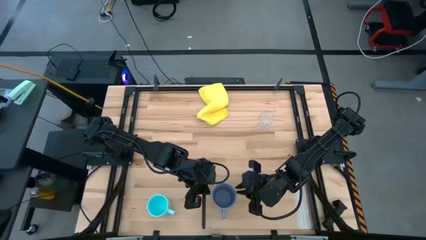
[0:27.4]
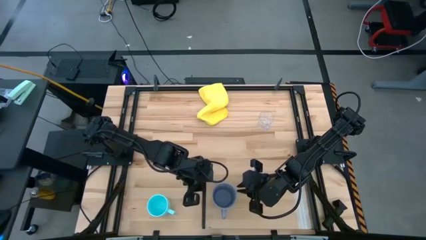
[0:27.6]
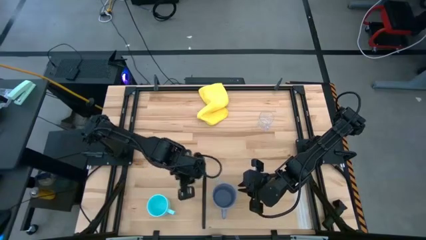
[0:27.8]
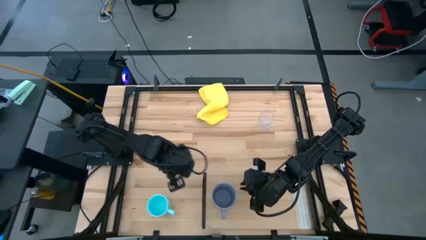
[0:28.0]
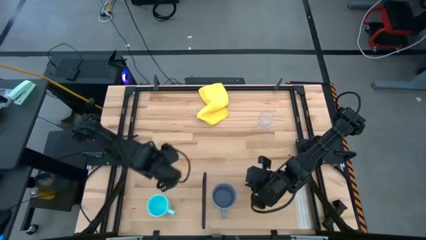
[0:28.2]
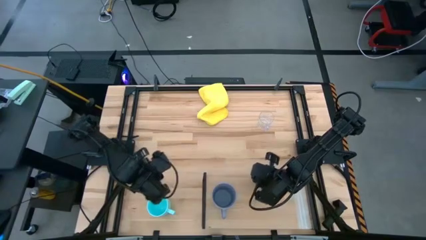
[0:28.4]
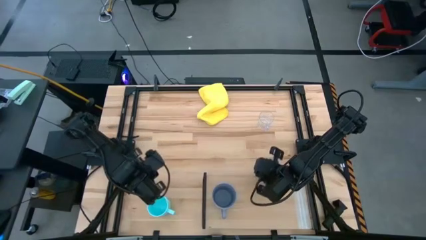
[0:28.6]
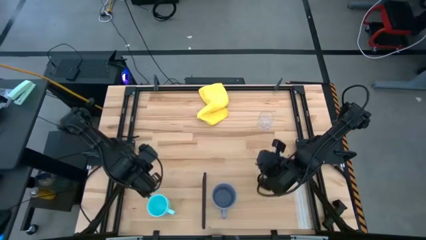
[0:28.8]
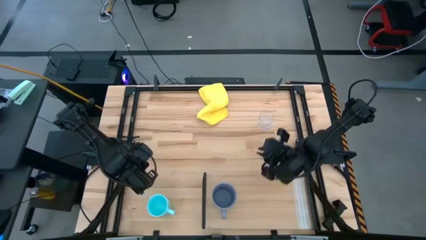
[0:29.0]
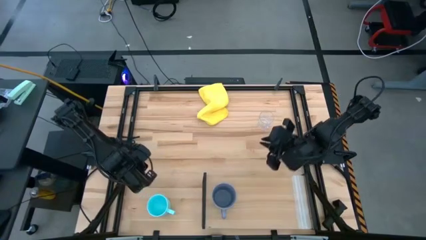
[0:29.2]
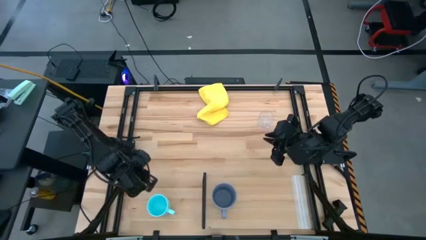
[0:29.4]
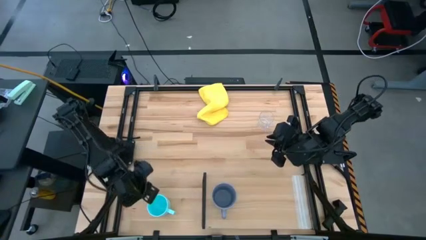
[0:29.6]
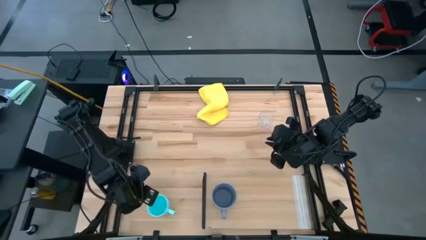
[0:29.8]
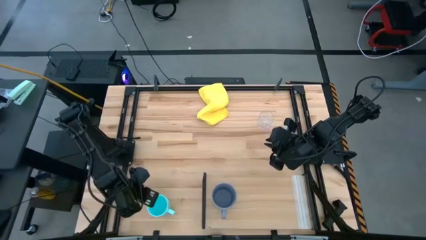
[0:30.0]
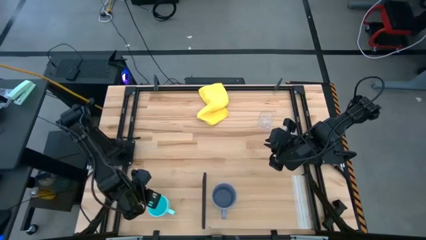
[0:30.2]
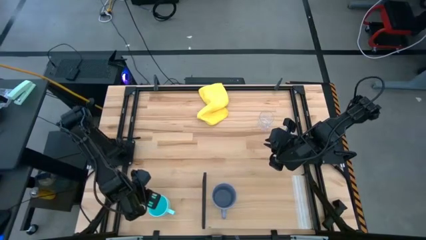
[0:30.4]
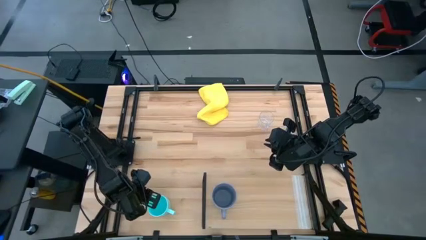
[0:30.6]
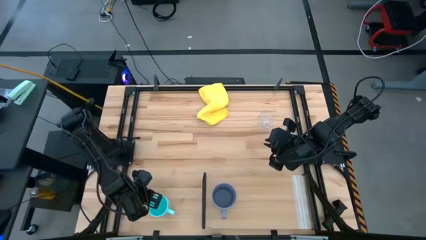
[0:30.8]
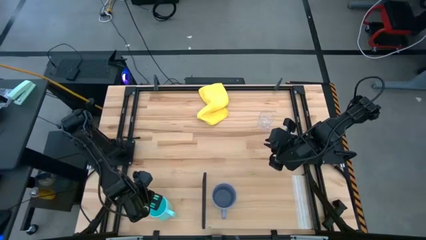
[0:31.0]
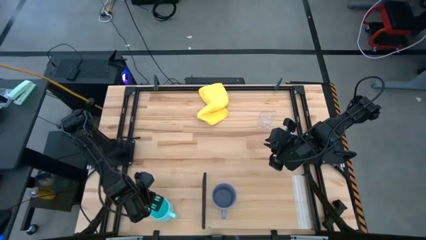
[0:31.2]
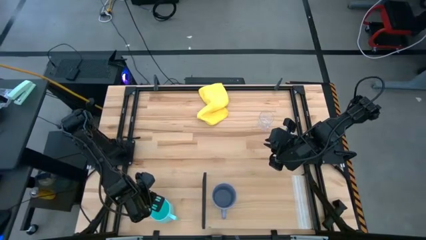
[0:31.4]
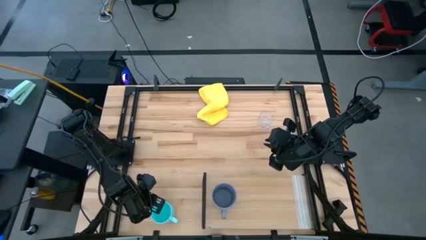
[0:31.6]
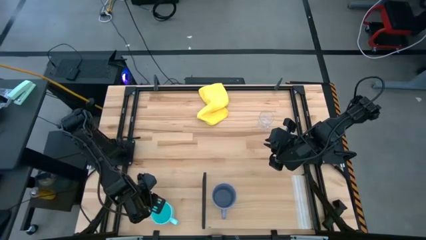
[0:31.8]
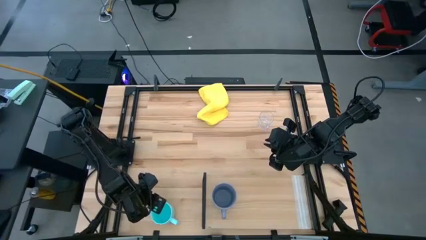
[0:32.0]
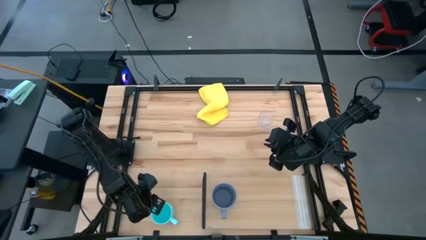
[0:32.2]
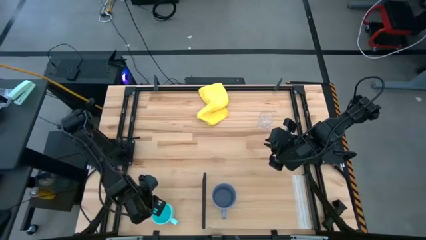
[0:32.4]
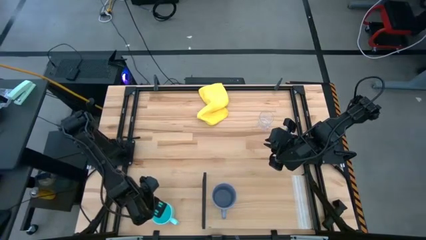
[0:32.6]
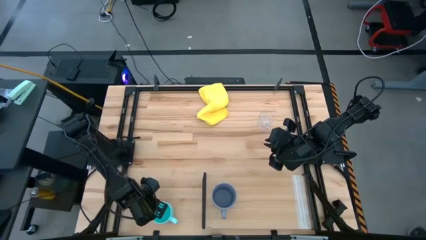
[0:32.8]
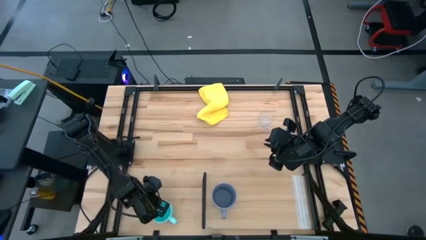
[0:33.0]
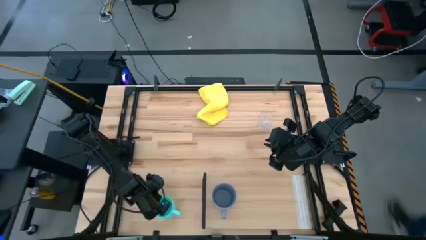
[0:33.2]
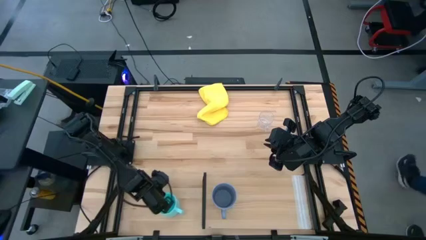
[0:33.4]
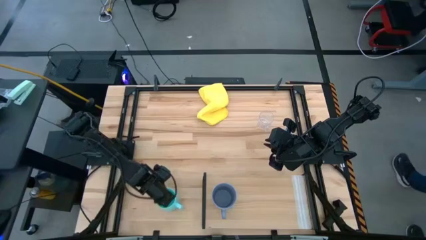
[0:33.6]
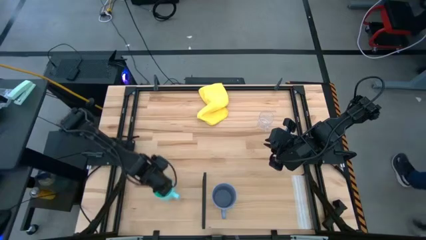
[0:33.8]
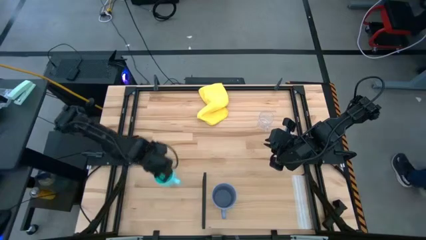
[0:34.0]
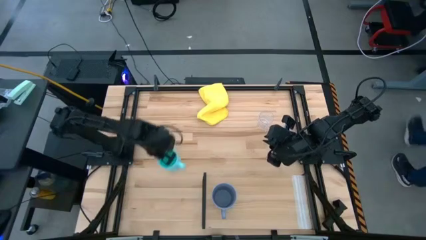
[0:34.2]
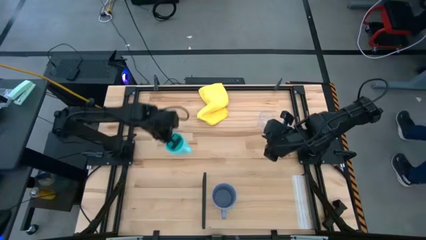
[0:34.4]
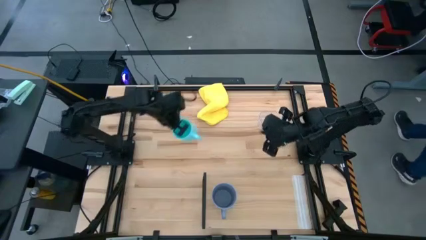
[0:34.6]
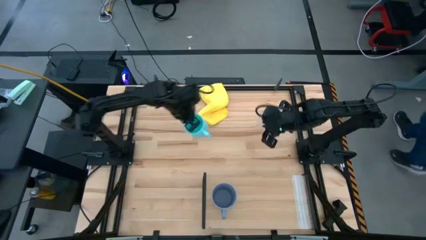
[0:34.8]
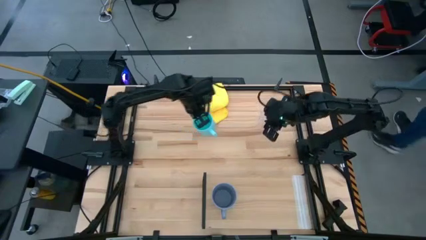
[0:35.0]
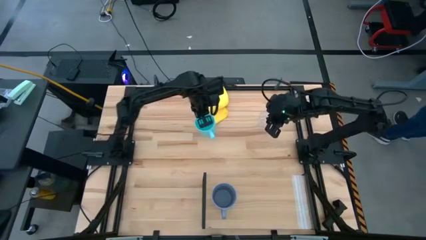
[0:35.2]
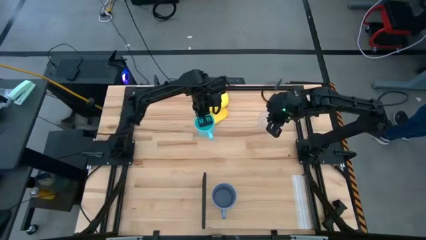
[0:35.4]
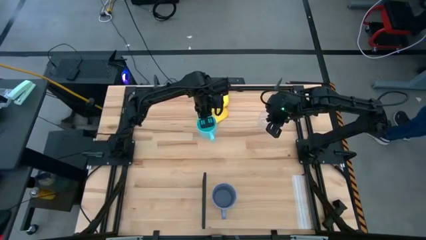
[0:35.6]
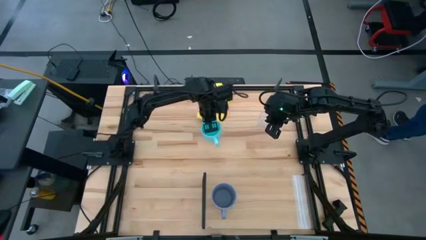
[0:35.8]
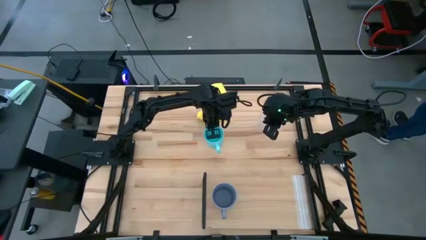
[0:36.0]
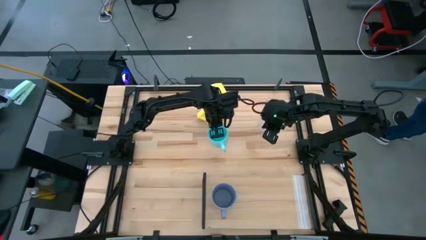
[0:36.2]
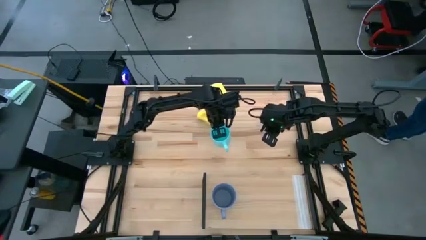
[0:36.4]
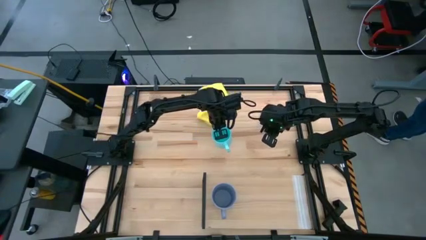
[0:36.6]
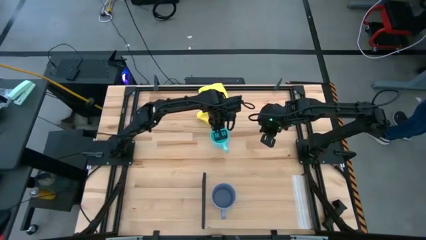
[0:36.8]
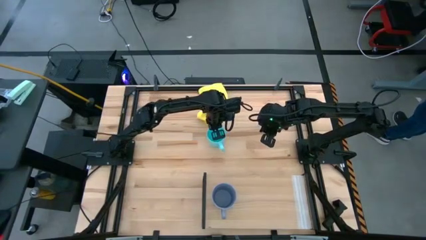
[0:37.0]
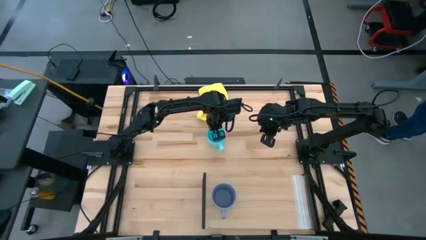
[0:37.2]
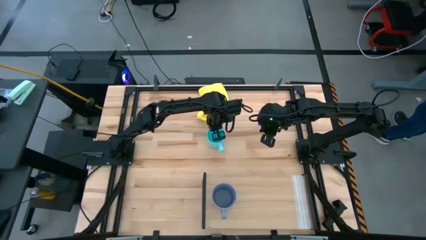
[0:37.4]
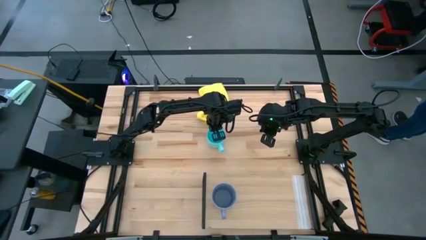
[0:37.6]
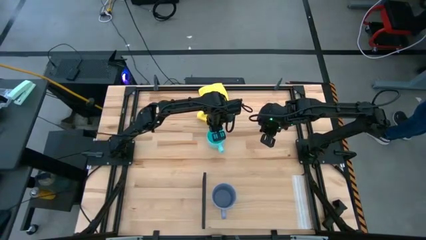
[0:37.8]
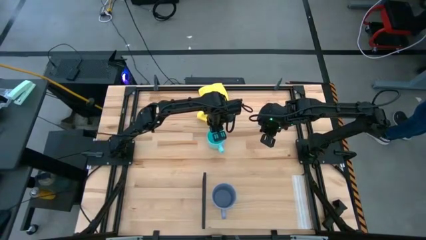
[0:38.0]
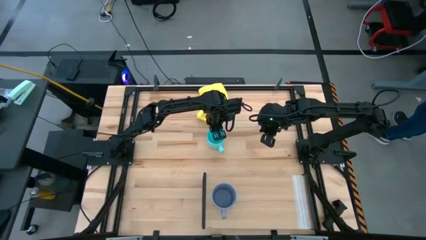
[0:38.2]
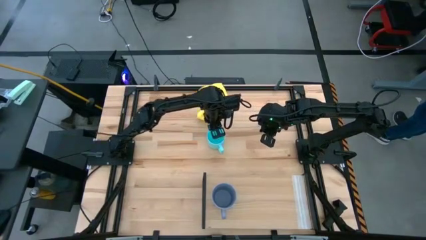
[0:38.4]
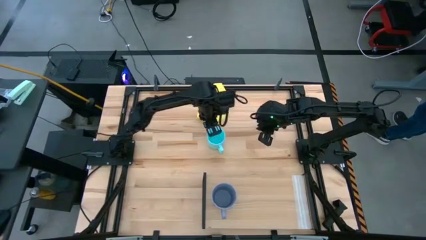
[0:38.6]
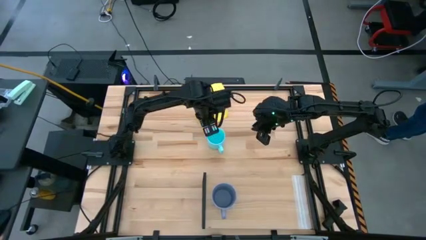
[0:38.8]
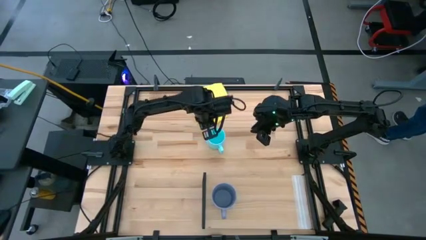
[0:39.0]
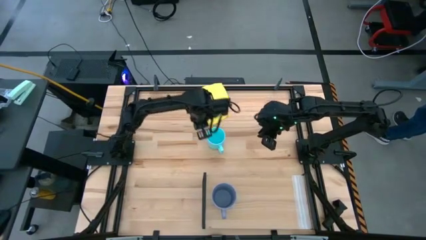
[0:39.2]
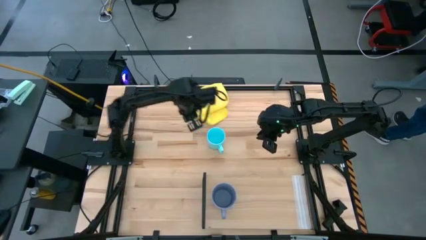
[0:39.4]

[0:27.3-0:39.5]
Task: Stack small to large cups/mugs on shelf
Put the light blue mug on the shelf

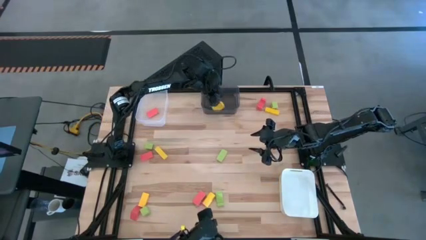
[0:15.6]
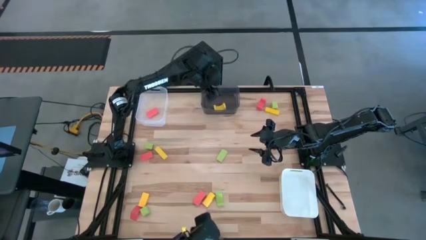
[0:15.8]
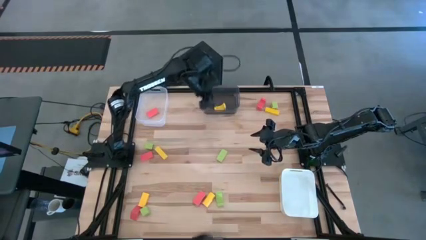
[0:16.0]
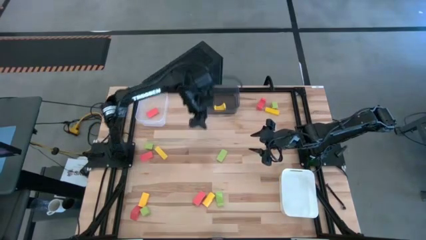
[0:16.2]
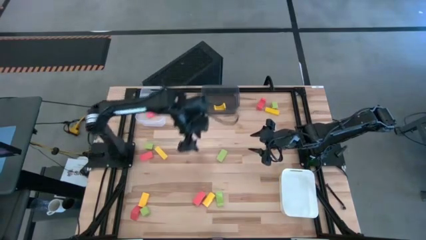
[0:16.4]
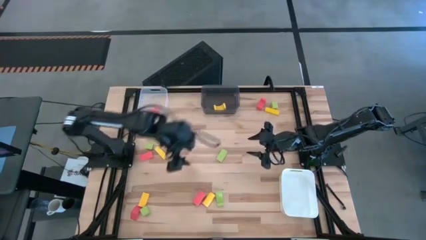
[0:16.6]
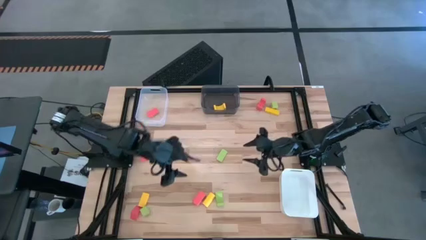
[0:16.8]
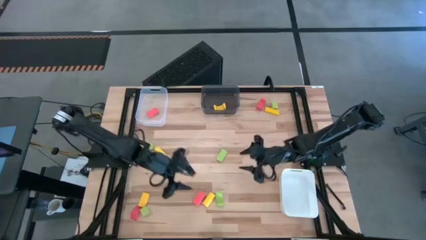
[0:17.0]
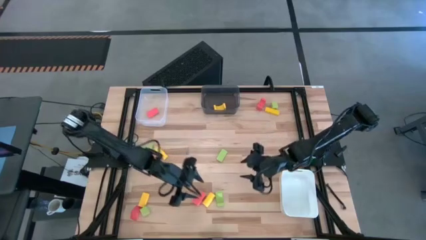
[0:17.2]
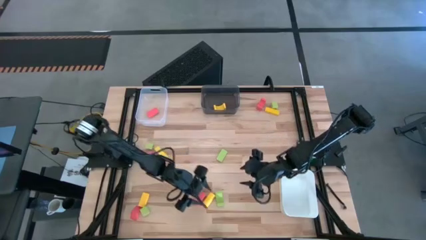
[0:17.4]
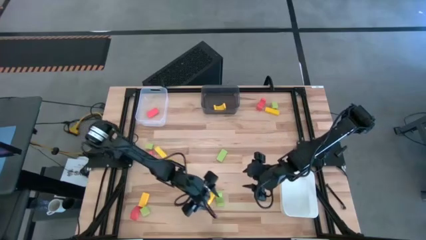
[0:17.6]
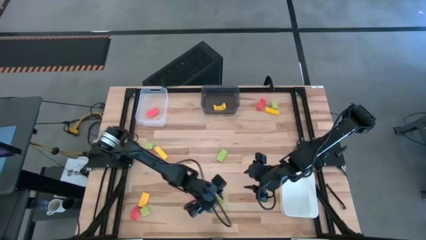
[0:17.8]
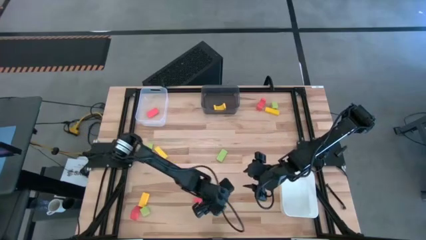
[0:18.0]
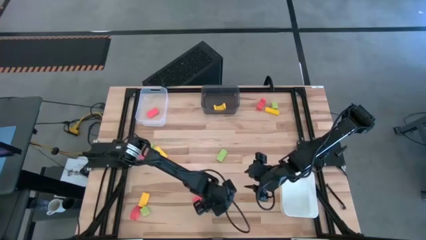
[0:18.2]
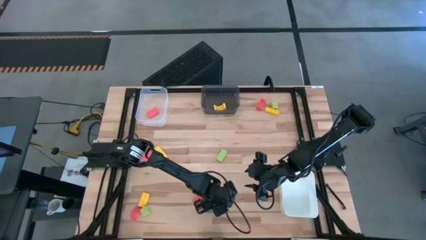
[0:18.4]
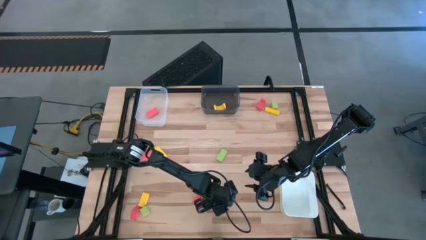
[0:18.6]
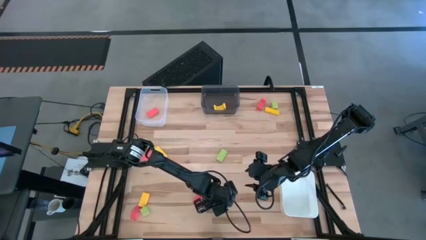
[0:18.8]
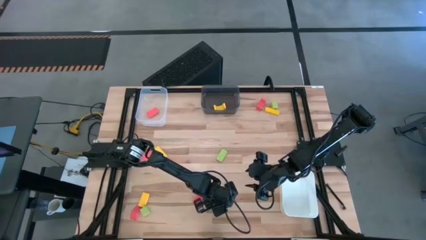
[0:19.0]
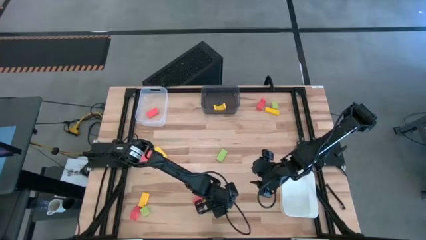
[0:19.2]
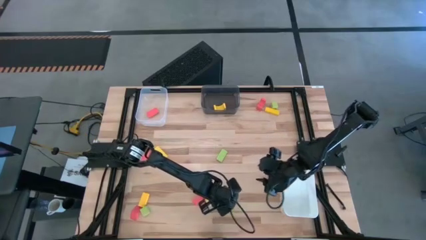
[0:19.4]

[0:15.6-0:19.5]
Task: Sort & place blocks by color
Put the green block into the white bin
